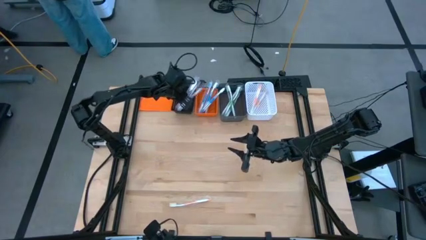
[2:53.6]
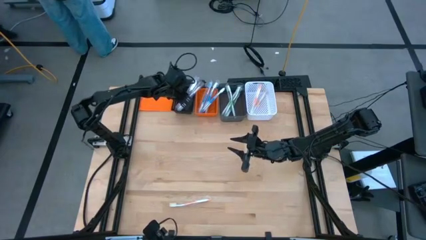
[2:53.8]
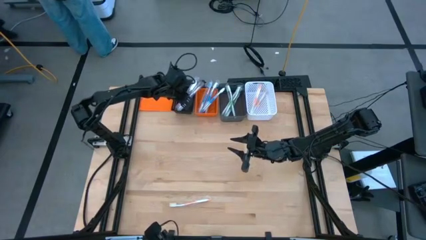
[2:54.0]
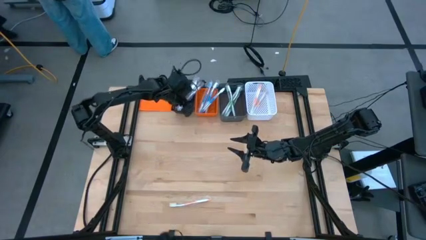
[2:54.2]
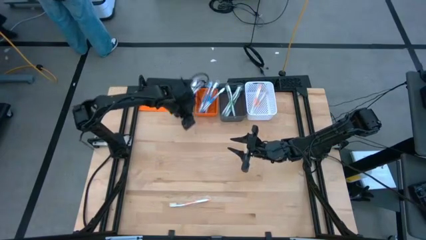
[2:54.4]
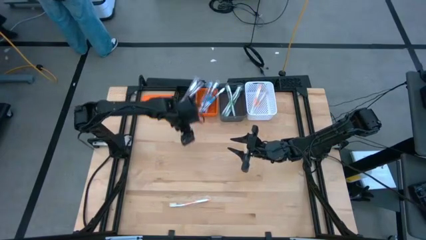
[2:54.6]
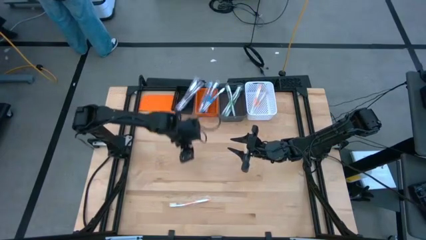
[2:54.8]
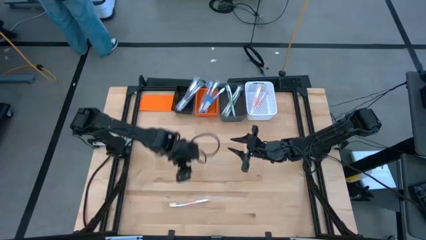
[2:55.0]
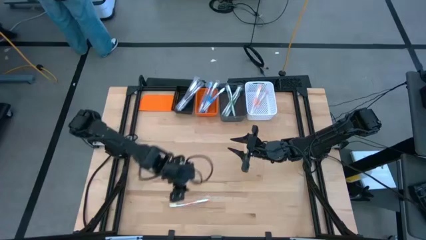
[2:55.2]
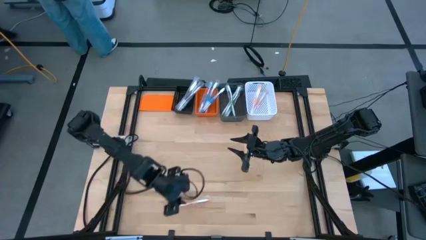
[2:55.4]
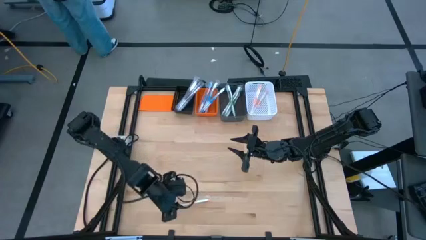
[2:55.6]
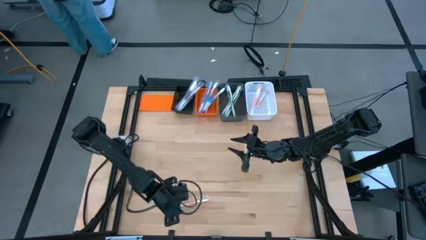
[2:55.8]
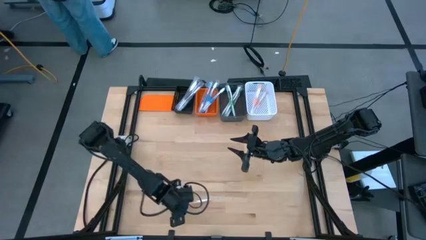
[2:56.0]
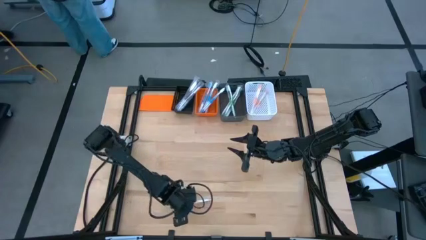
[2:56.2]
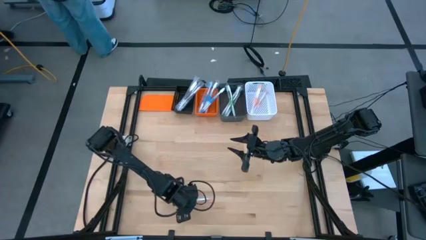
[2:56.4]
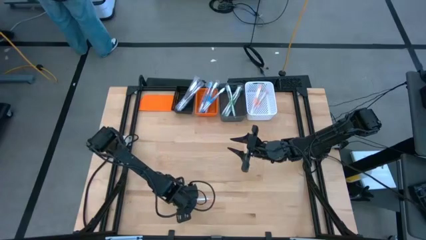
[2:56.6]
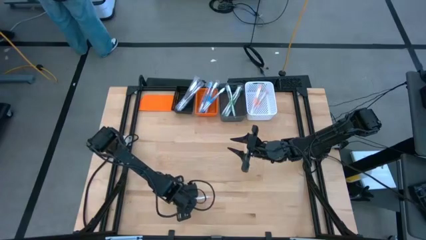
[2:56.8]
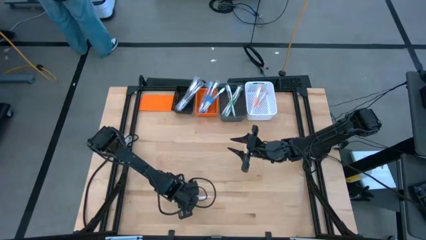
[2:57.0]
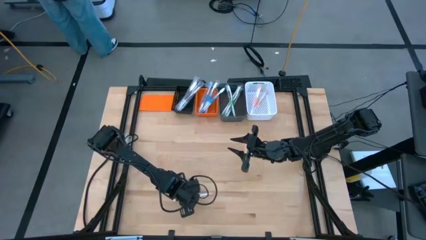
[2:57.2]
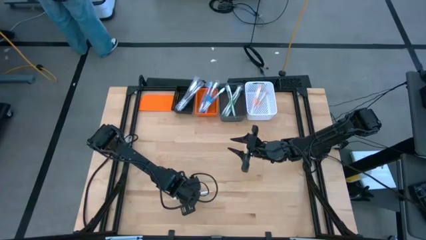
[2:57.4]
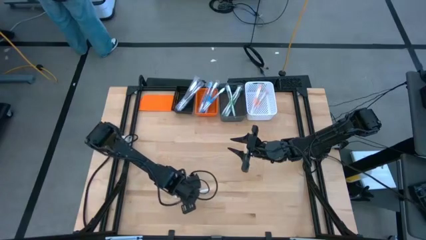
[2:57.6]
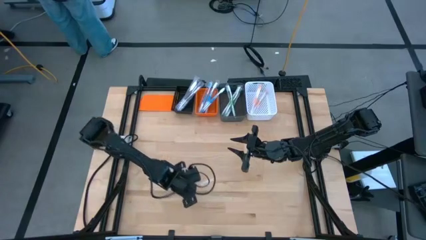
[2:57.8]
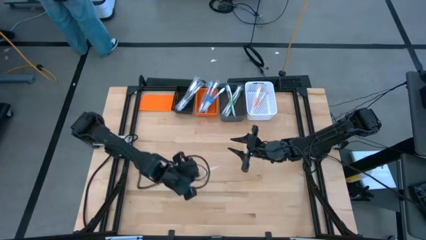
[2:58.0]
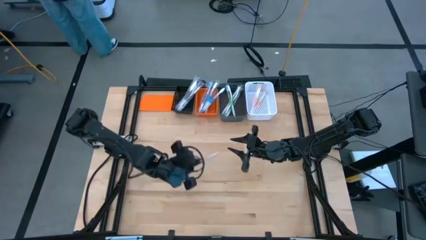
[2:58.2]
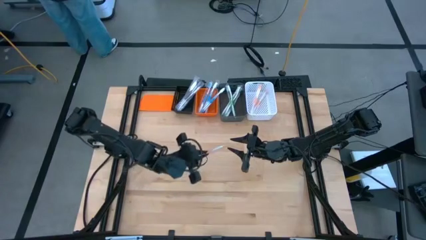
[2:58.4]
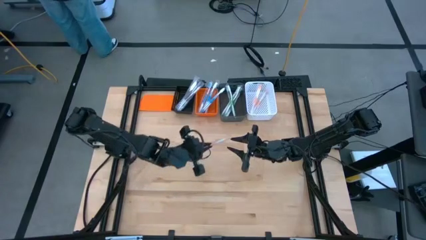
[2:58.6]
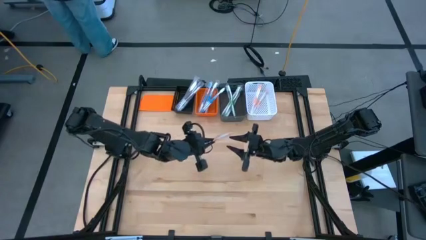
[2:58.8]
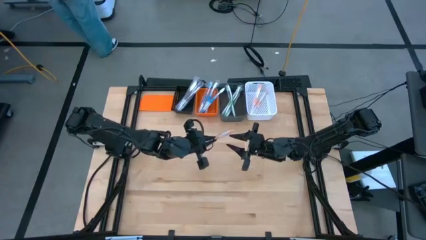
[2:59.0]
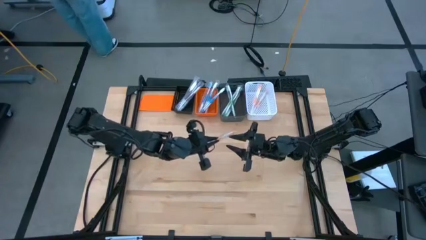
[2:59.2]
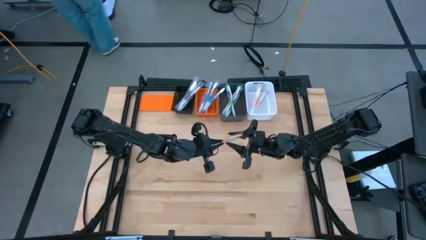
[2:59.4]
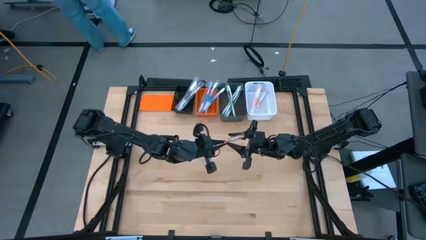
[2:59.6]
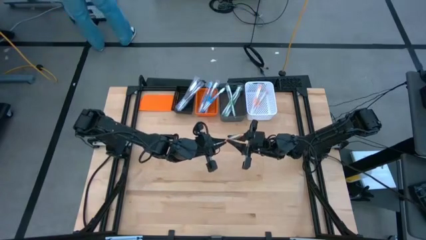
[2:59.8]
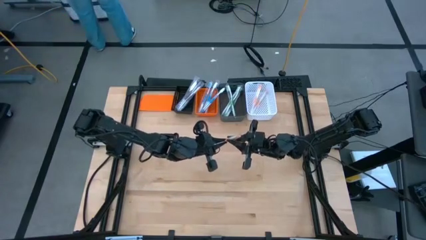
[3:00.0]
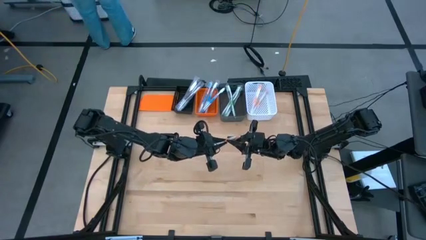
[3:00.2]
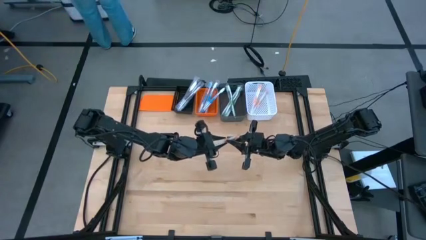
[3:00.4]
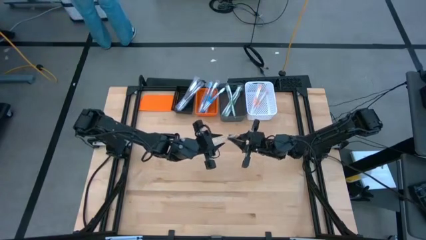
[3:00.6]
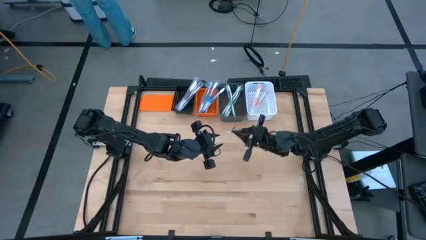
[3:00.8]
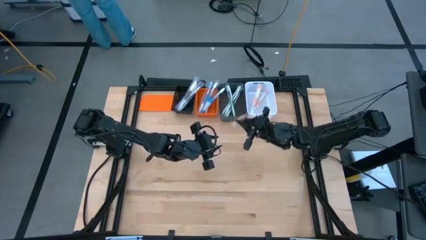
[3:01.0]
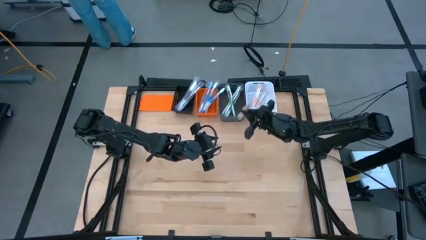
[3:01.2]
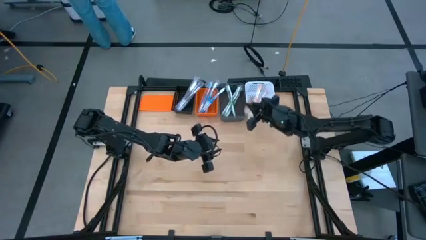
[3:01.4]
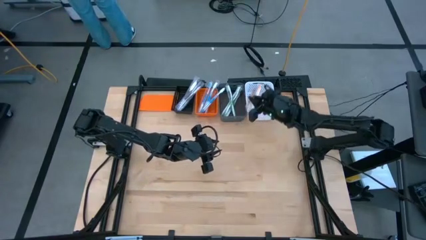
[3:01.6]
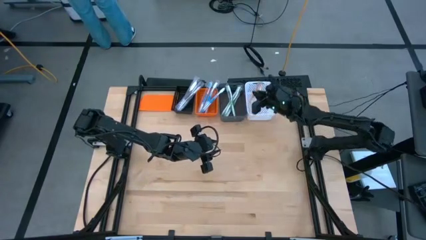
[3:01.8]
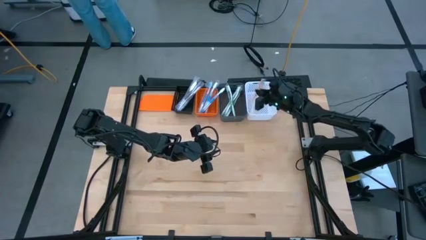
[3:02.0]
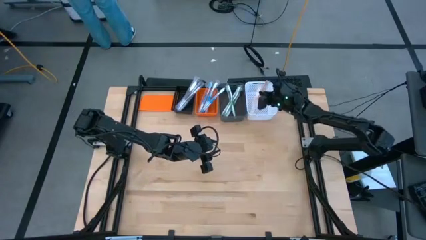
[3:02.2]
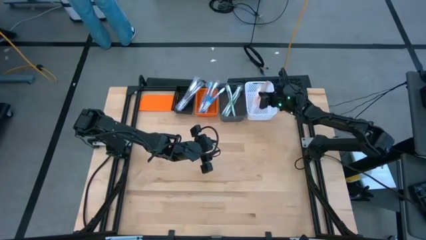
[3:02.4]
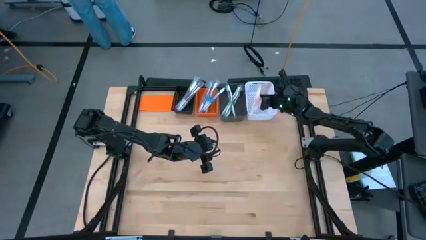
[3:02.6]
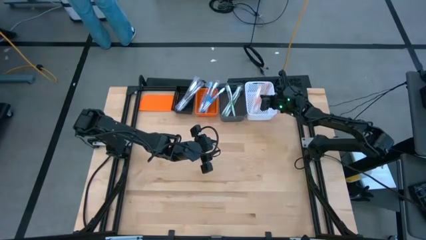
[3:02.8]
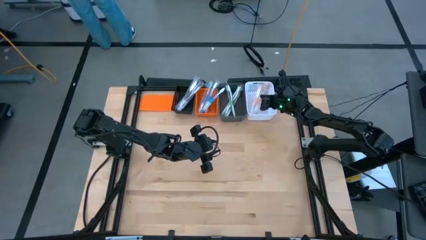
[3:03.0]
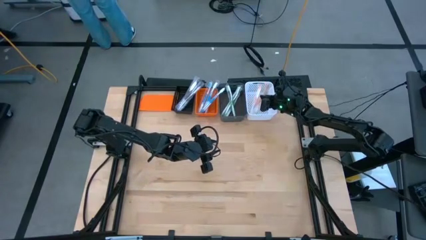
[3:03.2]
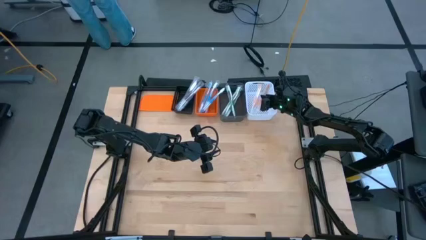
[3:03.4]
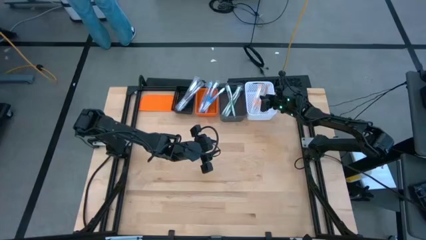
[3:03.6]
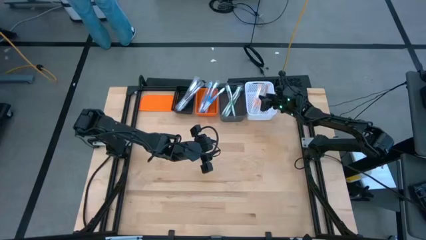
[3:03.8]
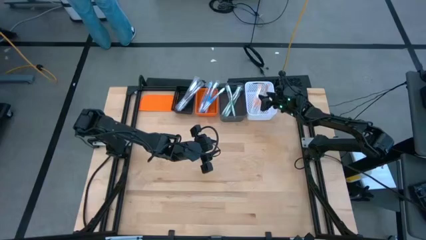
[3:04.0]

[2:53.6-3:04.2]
Task: Pick & Place Toothbrushes
Put the orange toothbrush into the white bin

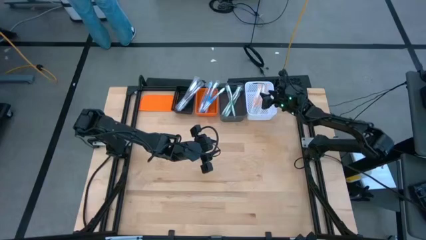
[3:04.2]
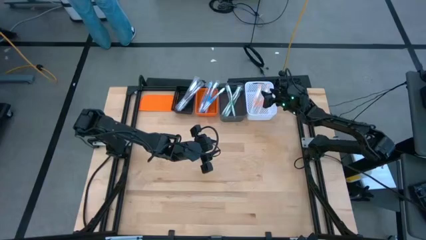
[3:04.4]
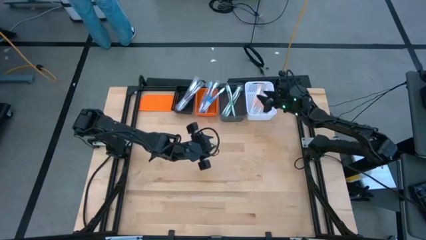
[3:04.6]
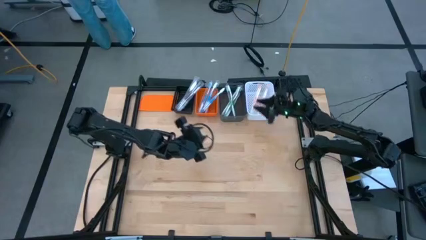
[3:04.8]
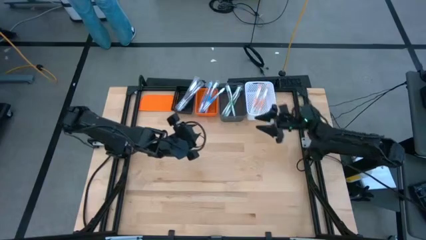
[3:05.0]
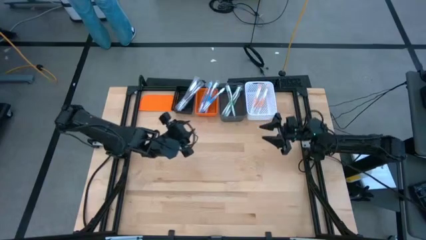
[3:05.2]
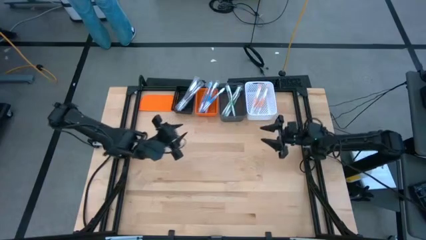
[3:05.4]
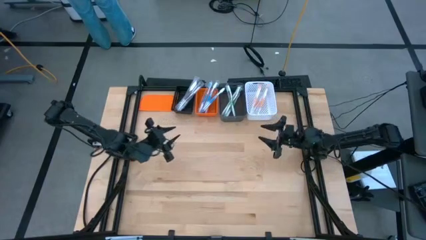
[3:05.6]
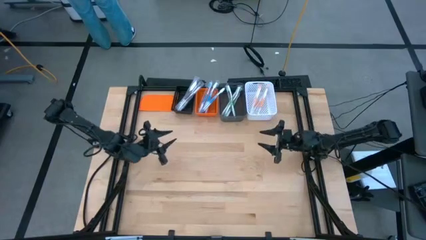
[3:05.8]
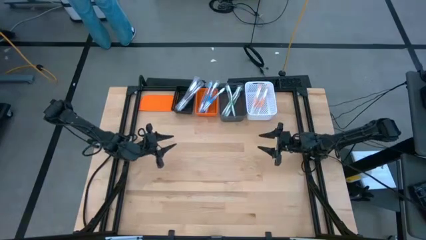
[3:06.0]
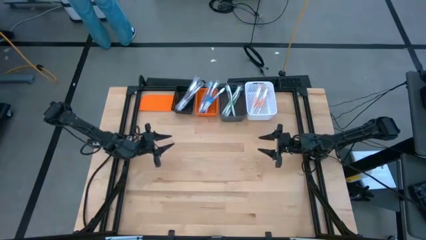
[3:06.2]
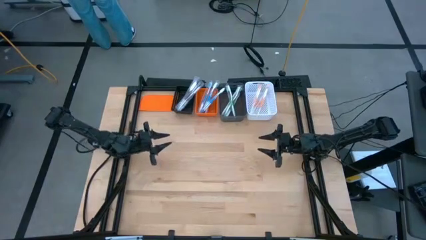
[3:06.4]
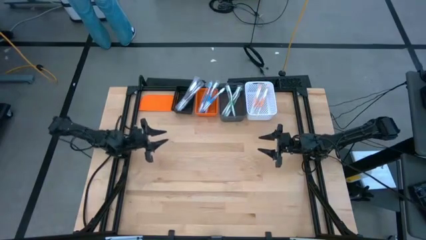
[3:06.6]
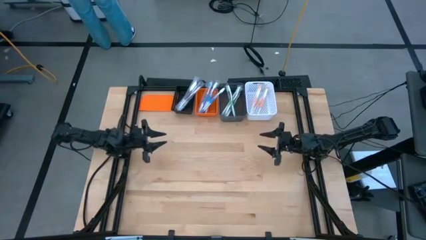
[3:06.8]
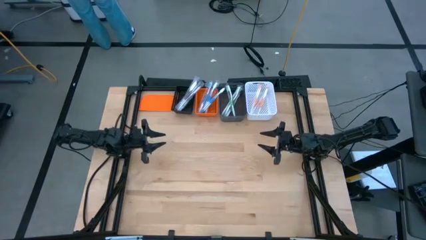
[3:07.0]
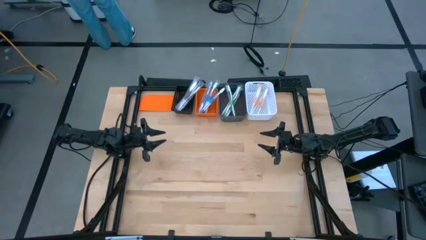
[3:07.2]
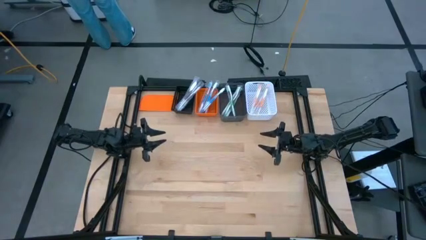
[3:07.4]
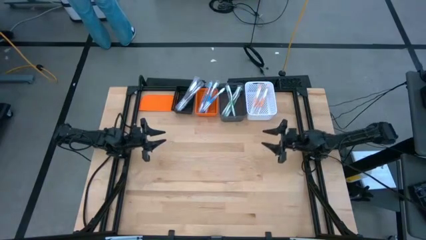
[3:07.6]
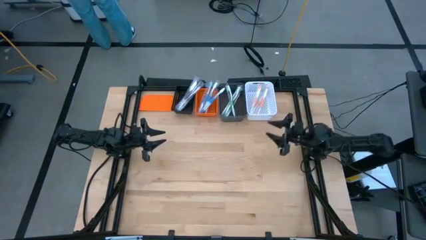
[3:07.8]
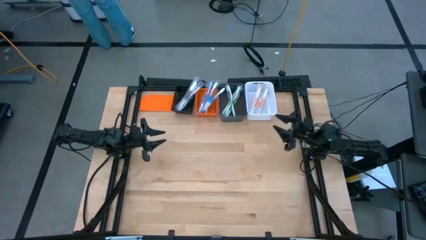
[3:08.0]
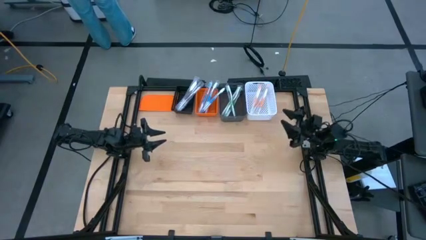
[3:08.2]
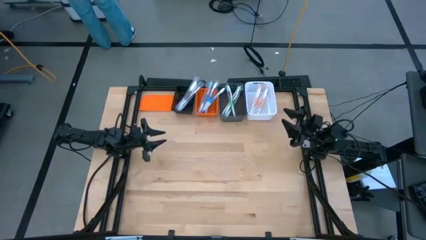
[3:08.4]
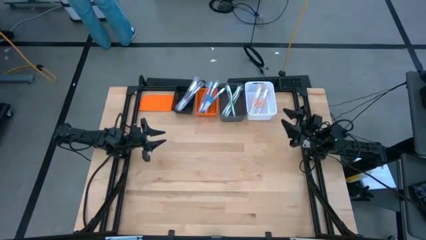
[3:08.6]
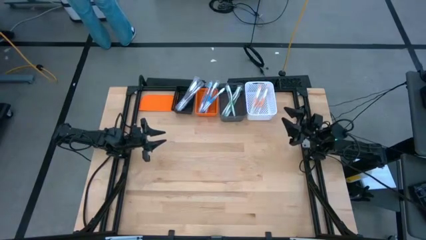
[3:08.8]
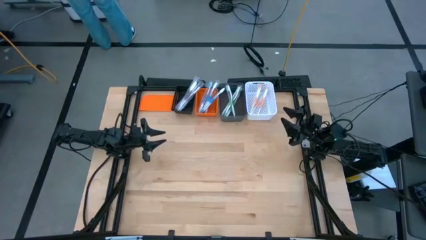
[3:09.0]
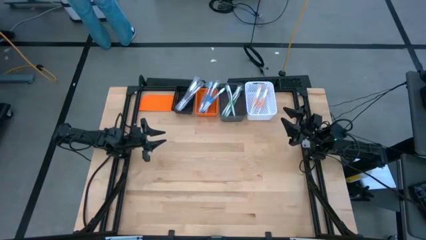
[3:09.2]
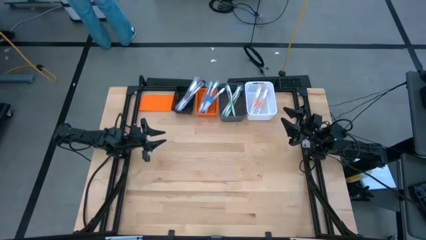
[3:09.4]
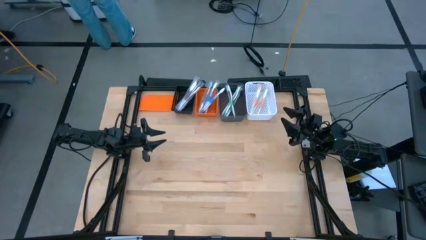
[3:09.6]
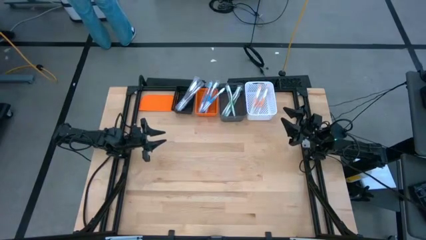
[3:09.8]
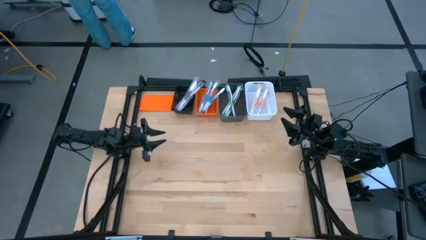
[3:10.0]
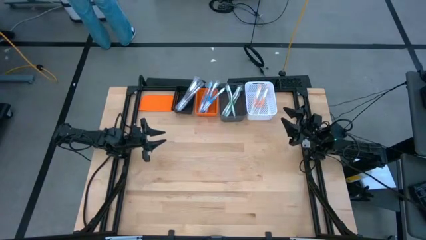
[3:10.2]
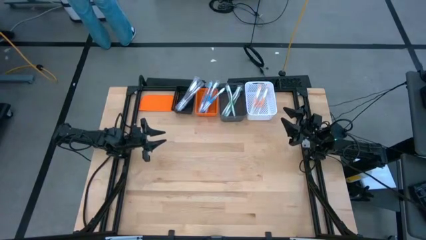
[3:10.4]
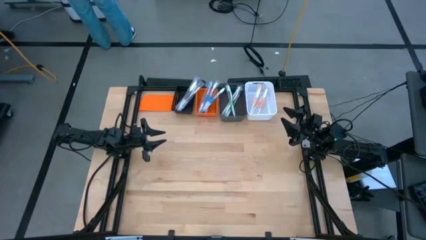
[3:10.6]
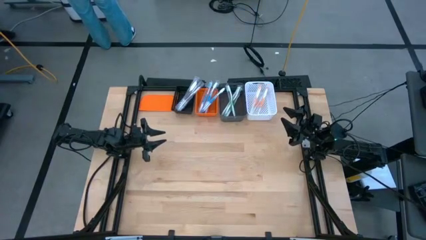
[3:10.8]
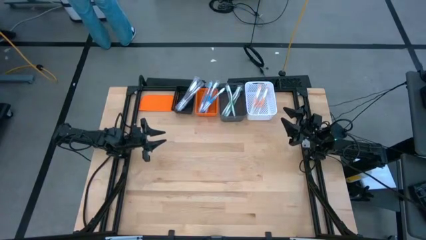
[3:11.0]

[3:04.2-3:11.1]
Return to Home Position
